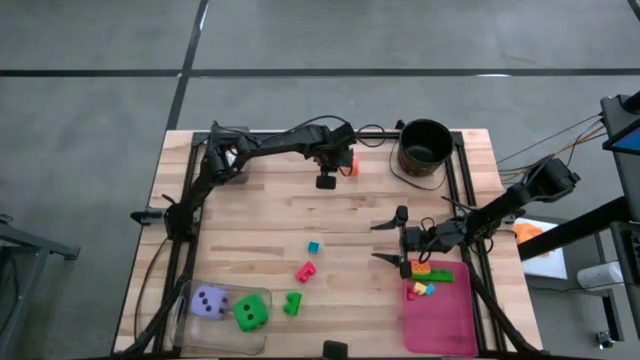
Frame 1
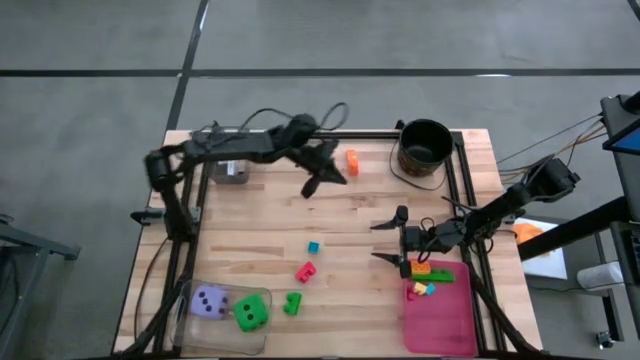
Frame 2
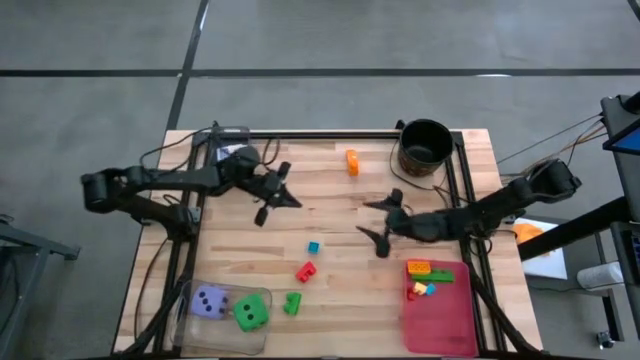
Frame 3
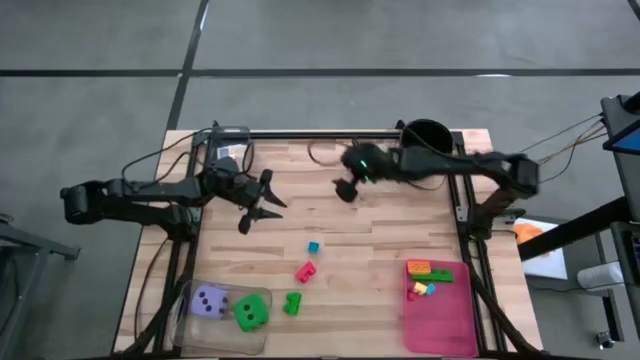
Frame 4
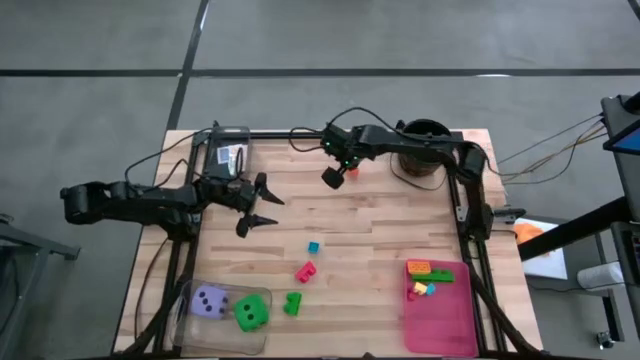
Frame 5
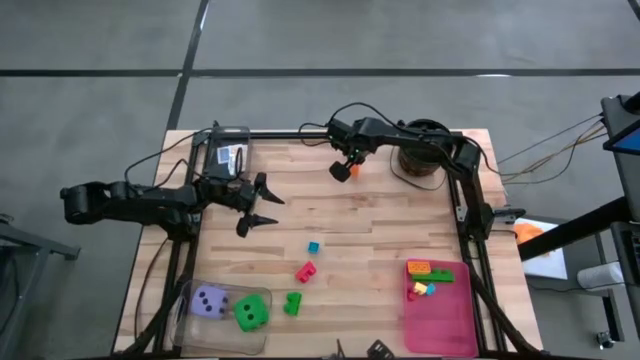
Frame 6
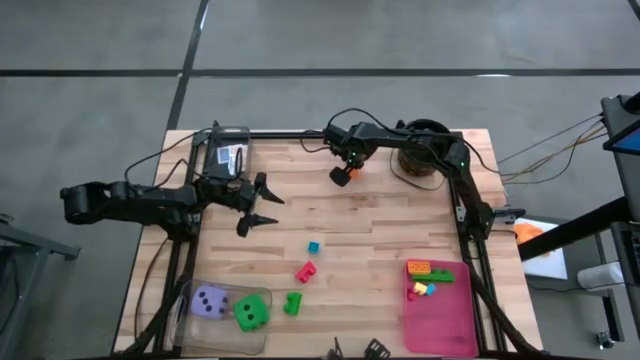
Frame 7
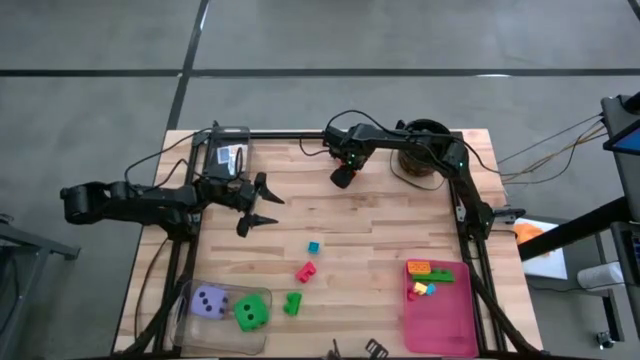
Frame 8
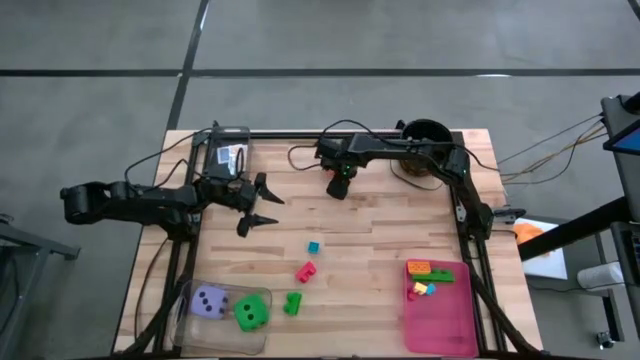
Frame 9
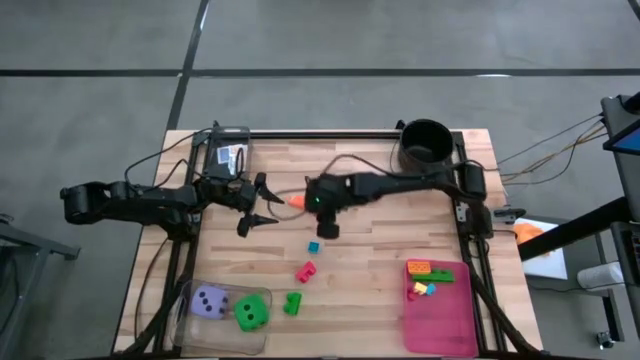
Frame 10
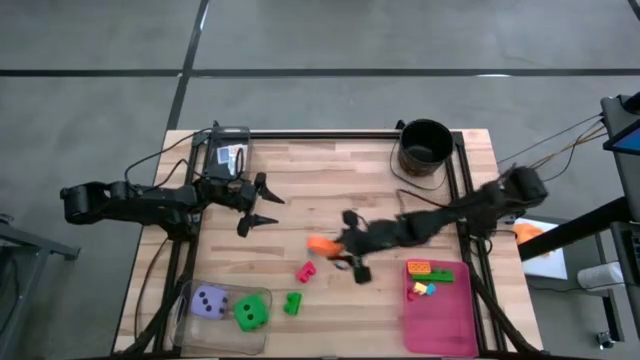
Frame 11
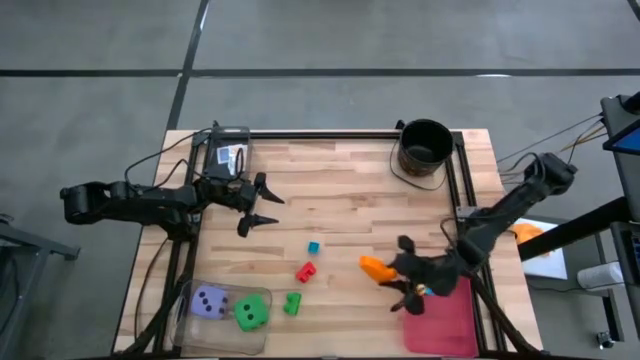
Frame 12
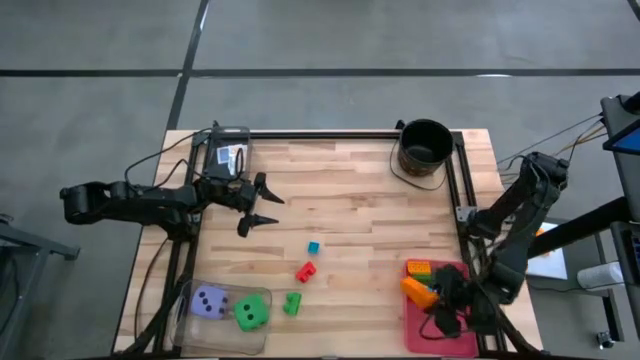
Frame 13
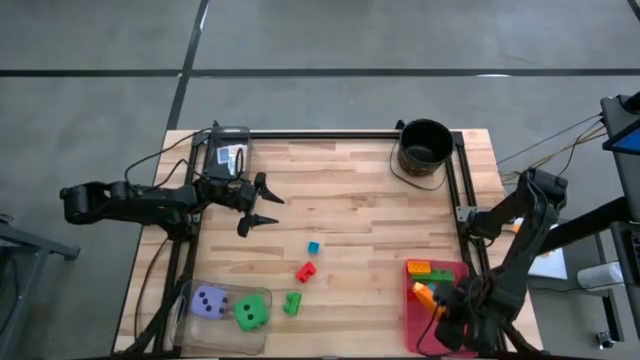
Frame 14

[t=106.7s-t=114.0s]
Task: Pick & Place Toys
Put the orange game piece into the pink bin

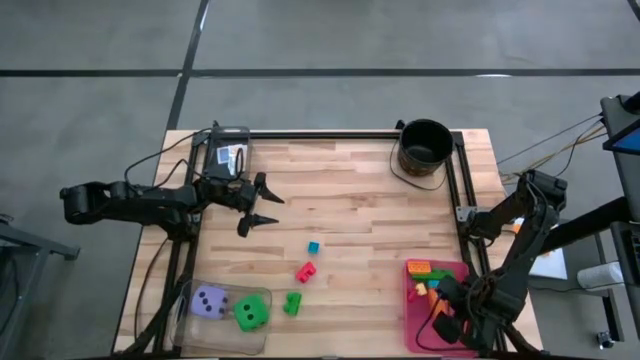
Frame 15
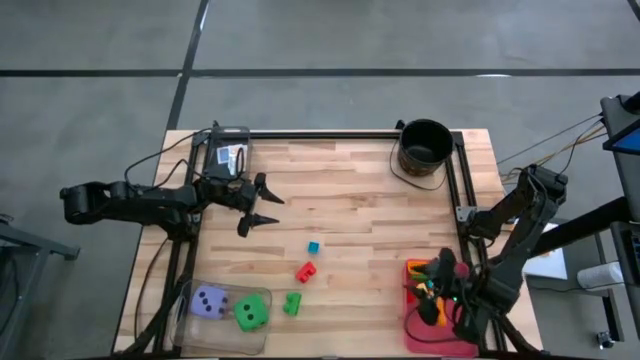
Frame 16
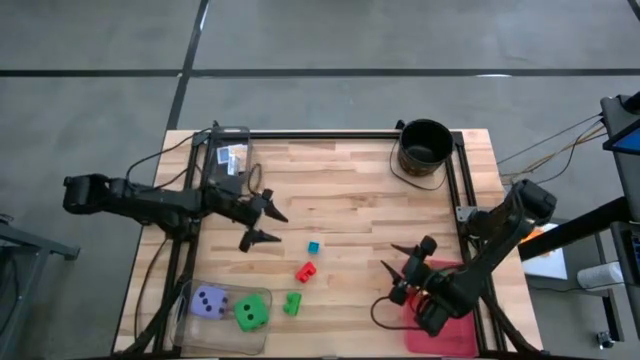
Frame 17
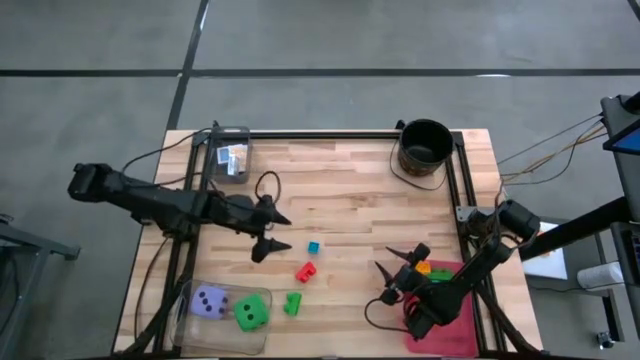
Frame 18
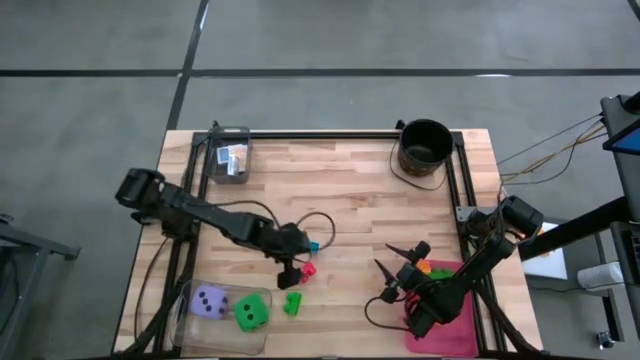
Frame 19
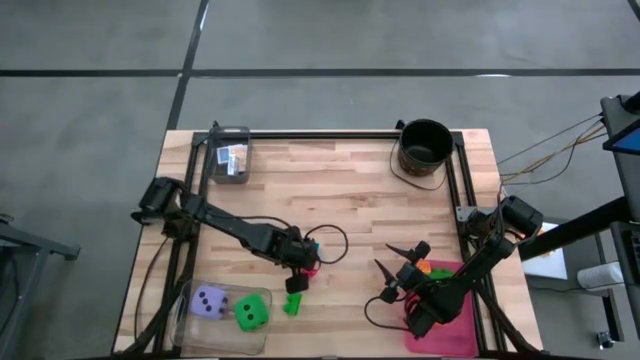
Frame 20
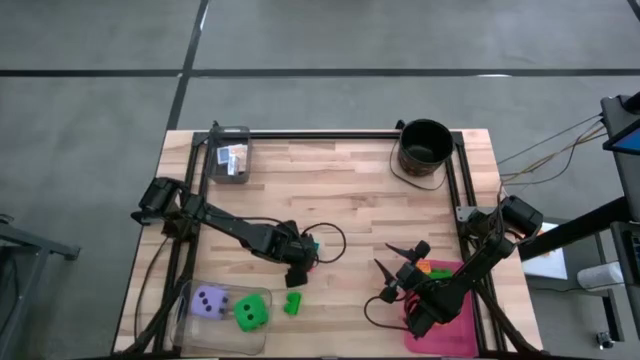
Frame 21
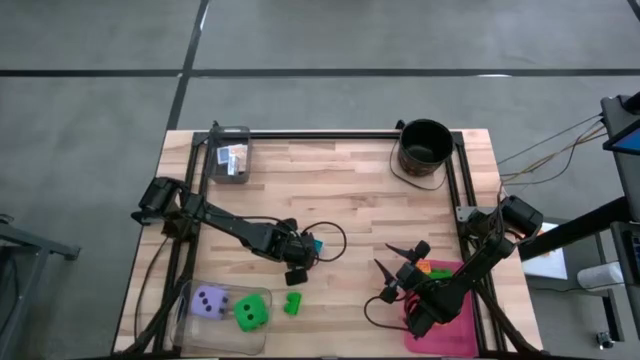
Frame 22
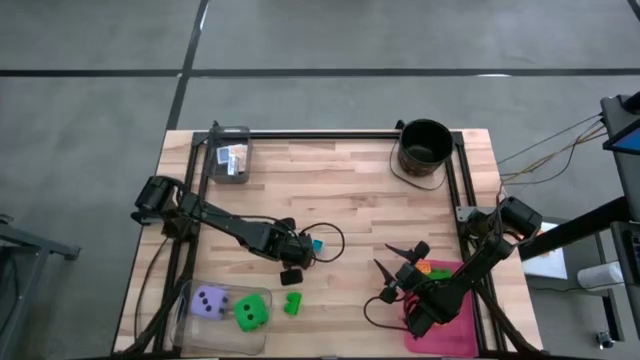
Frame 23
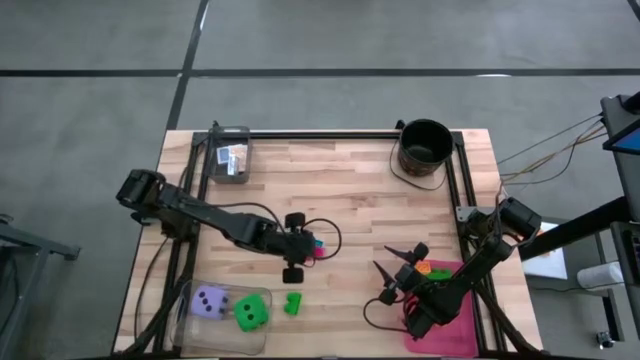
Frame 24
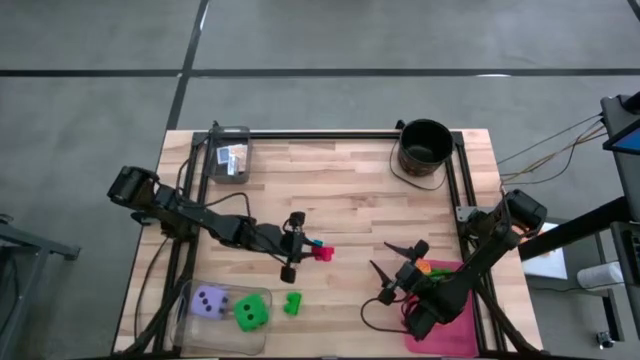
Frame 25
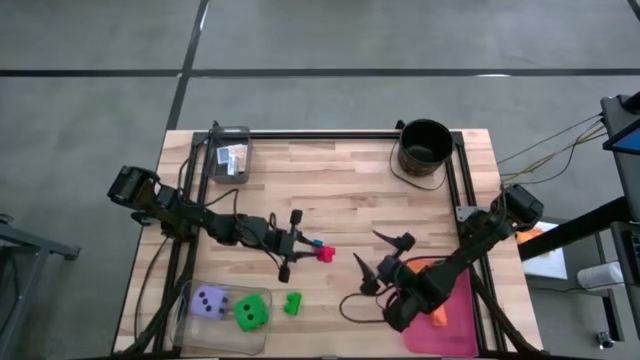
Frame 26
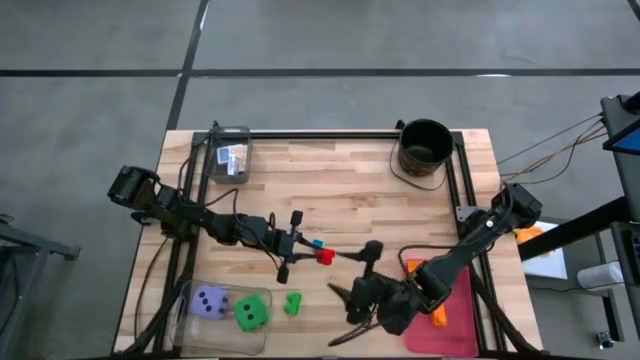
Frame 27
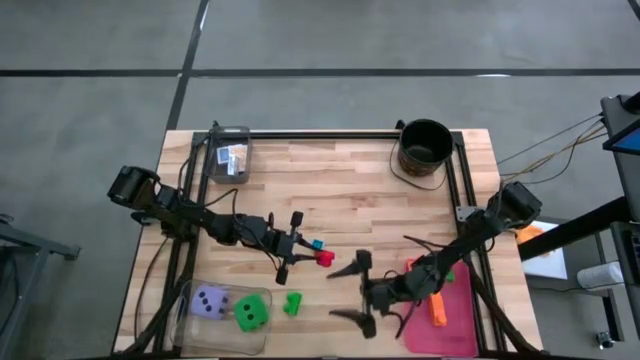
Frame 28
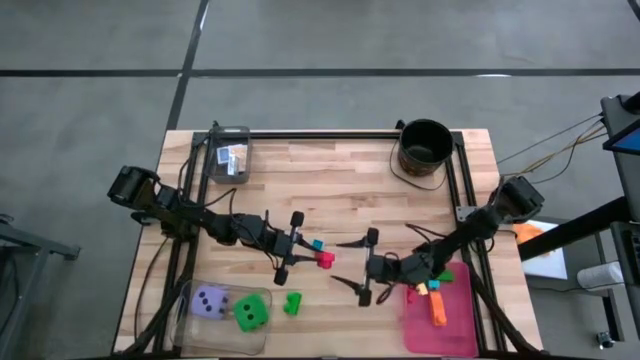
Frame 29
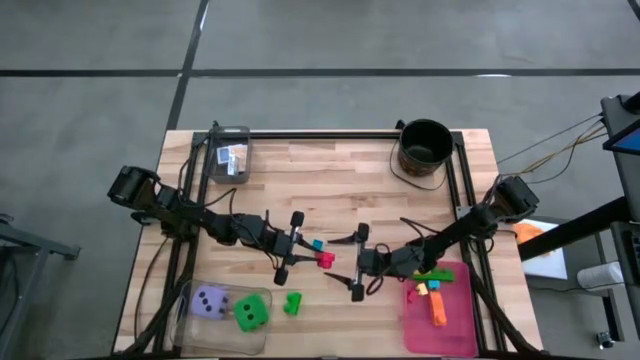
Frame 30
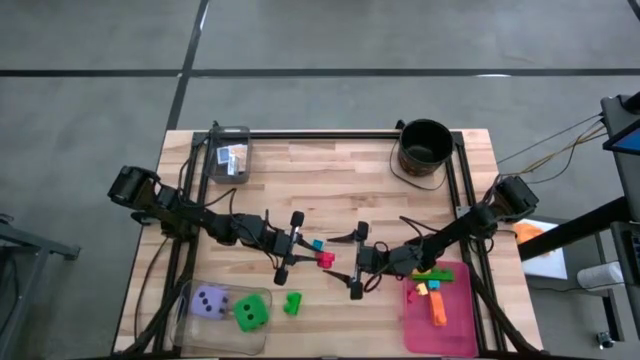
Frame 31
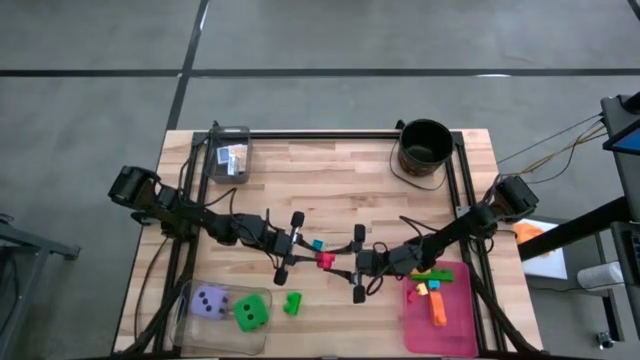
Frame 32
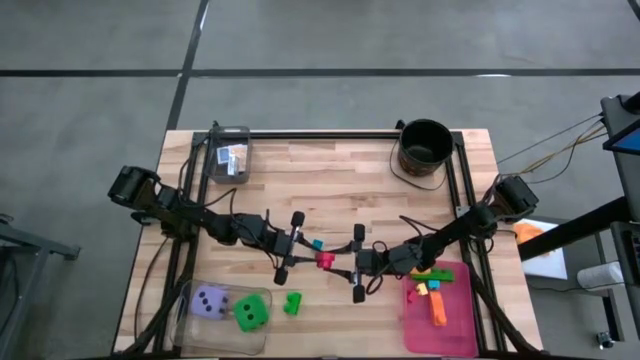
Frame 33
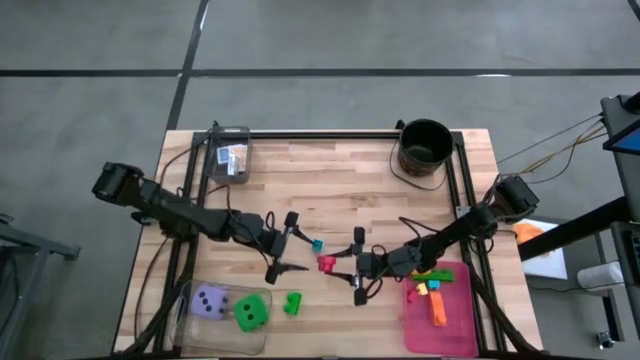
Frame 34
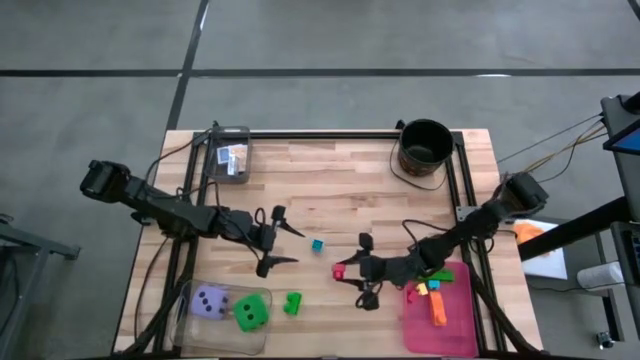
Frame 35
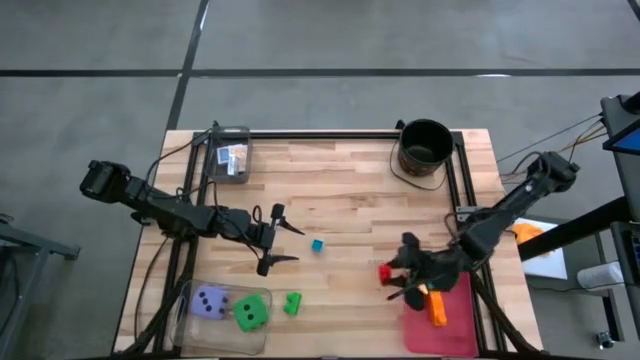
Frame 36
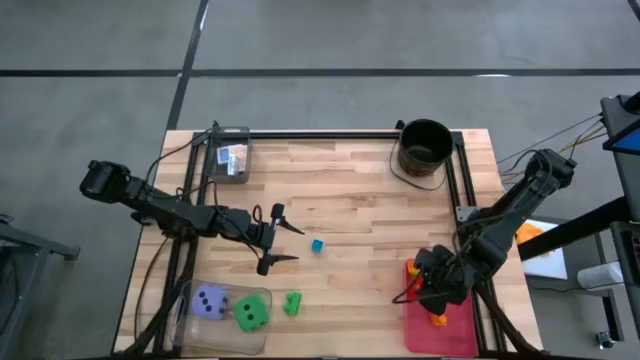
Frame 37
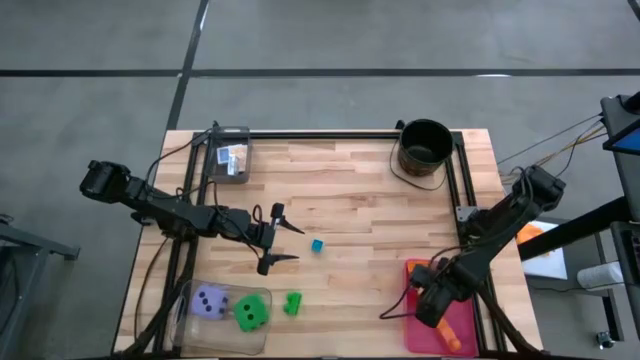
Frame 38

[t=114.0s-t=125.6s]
Put the red game piece into the pink bin

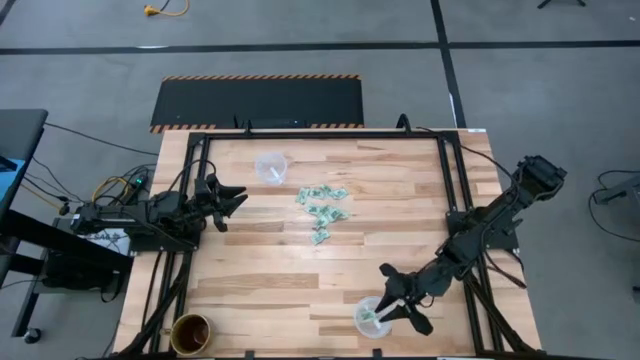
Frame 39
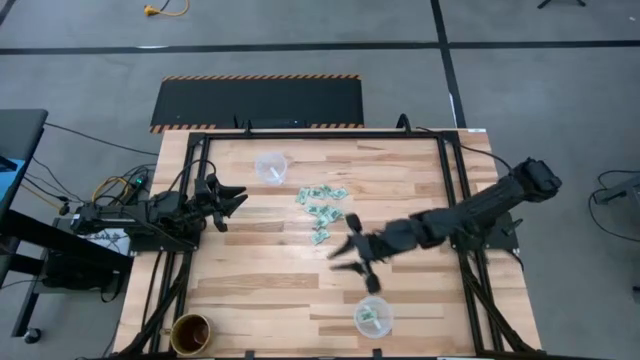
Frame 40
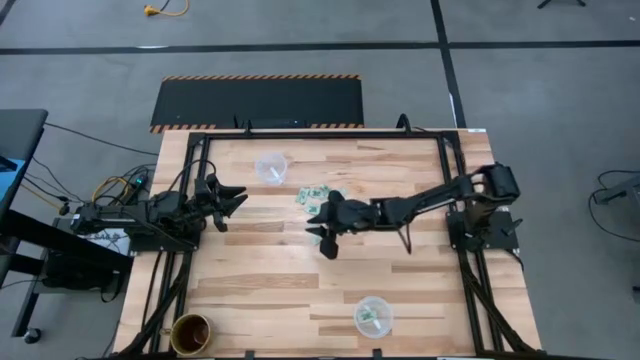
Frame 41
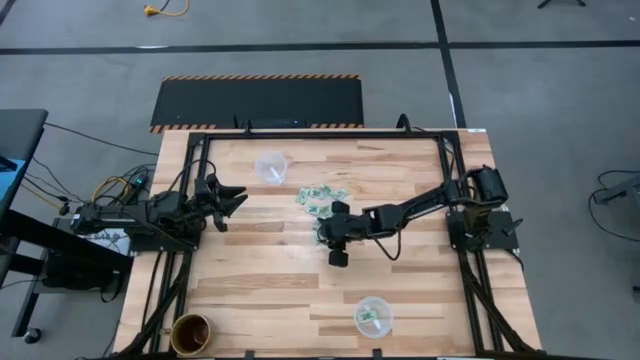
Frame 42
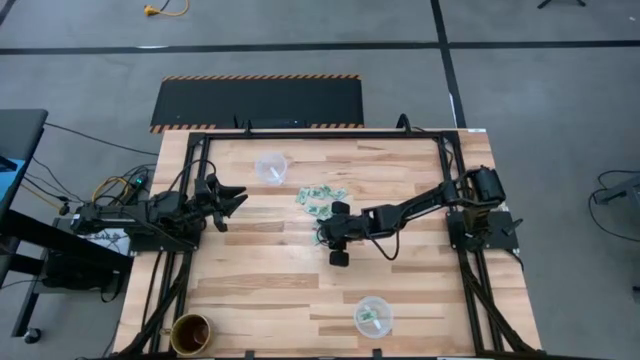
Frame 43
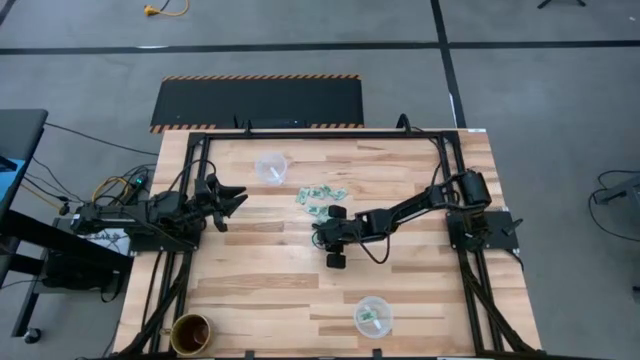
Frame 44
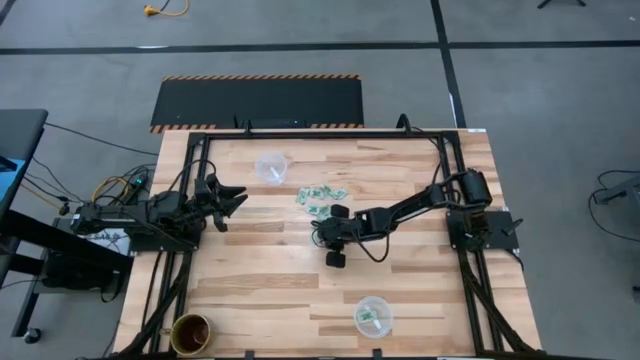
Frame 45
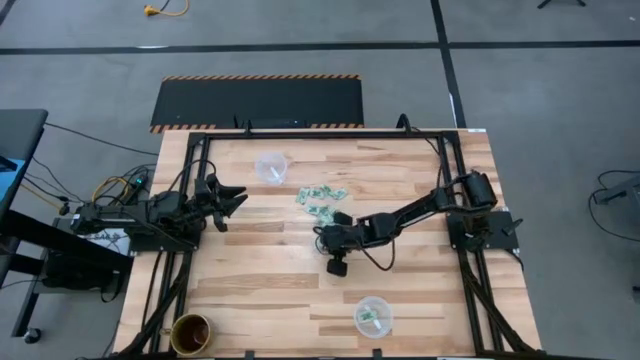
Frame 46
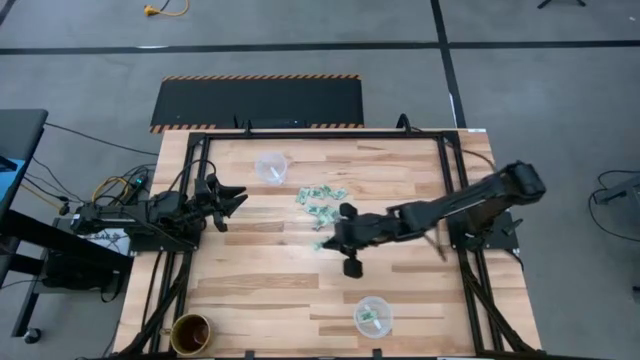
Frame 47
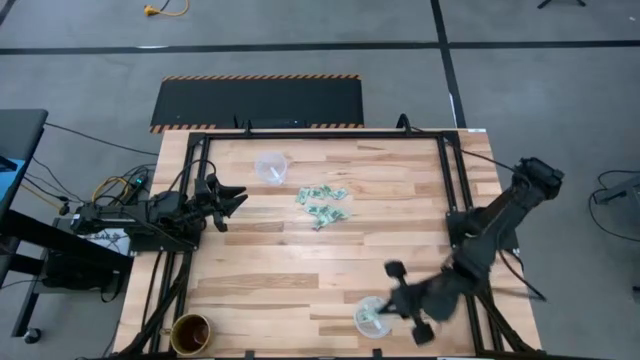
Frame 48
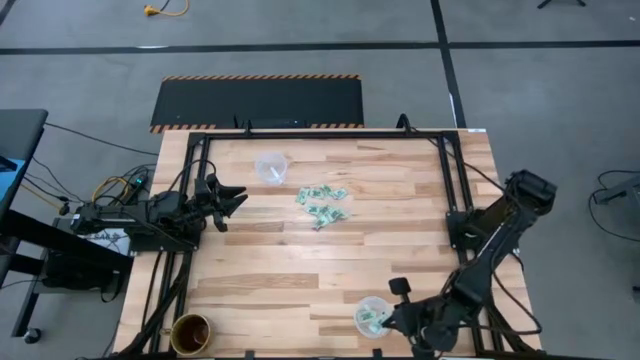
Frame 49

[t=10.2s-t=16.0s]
Task: Pick and place Stevia / Truvia into bins
Put the white stevia packet into the bottom transparent container
